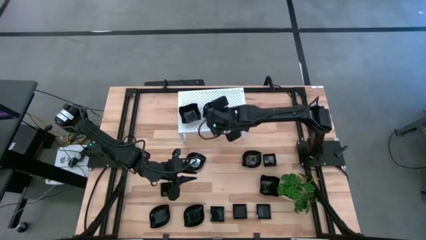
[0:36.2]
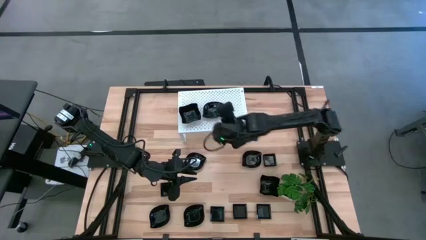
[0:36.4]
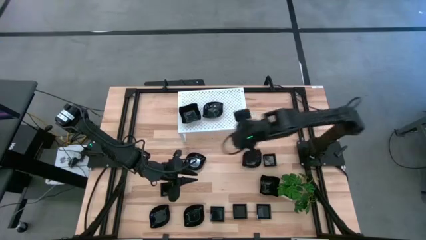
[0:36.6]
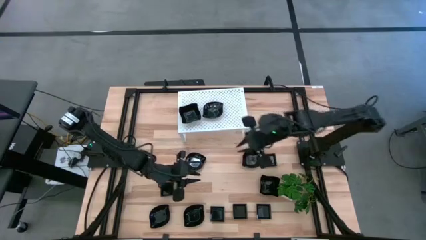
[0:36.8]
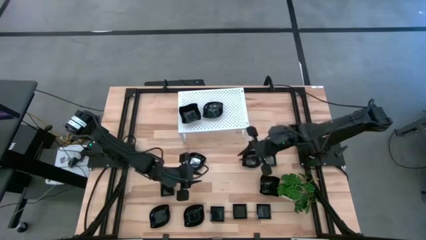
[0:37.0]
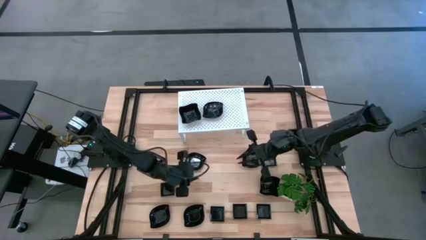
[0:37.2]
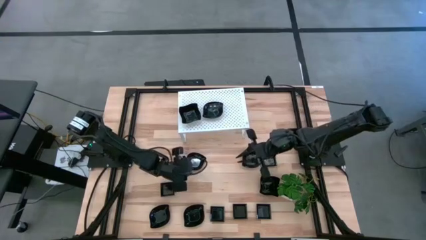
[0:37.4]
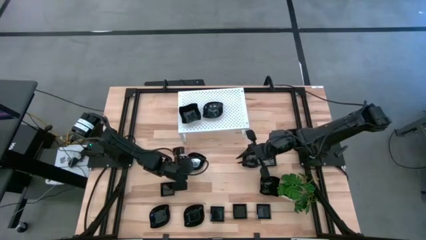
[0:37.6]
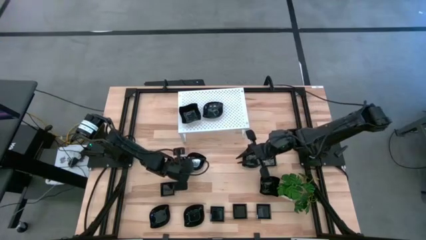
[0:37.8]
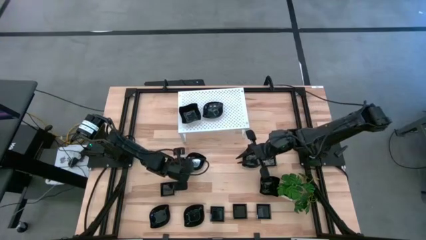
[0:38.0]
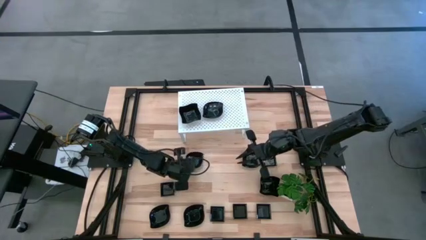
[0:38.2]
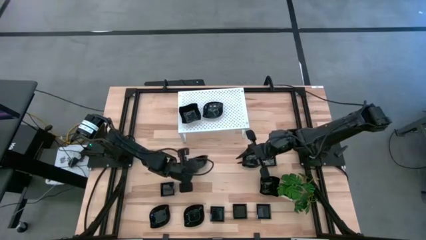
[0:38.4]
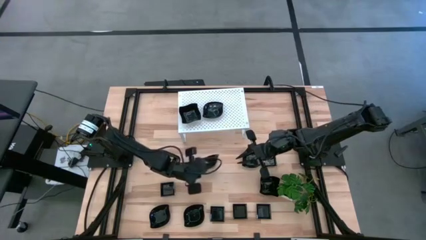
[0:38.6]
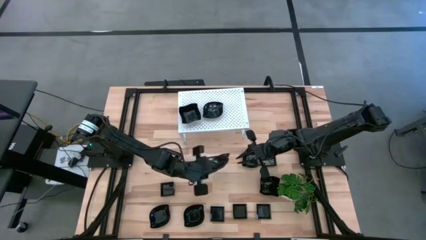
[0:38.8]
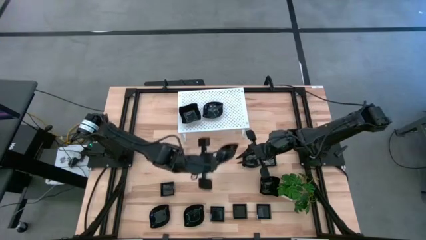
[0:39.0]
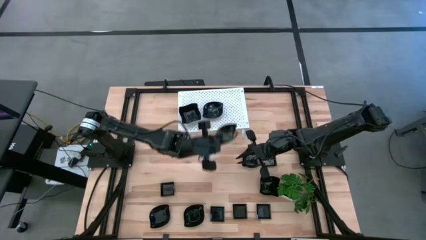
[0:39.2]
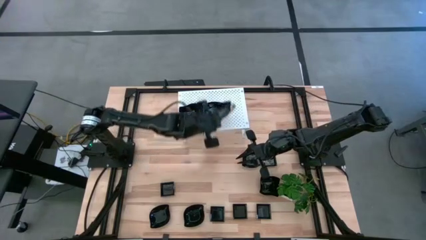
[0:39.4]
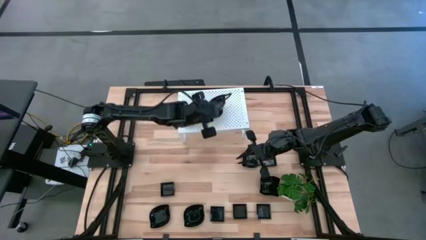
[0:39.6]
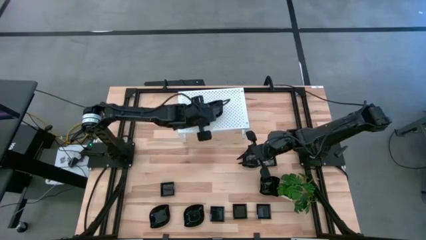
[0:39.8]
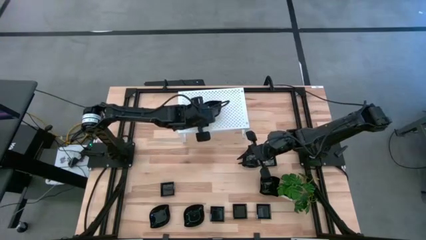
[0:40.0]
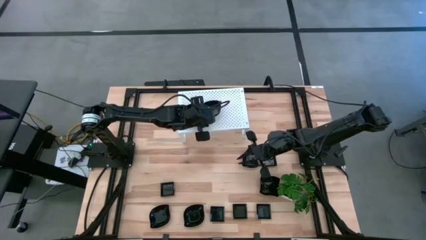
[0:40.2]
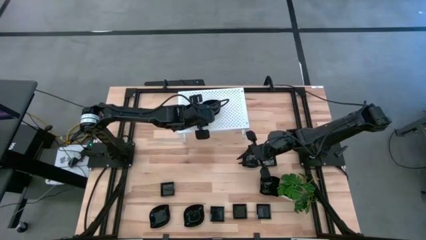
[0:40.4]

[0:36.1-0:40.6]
Task: Pick & Place Mini shaped plates
Stack the black leaf shaped plate on top of the black leaf shaped plate on the shelf

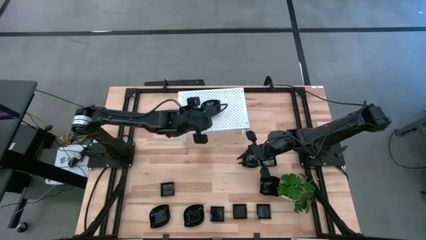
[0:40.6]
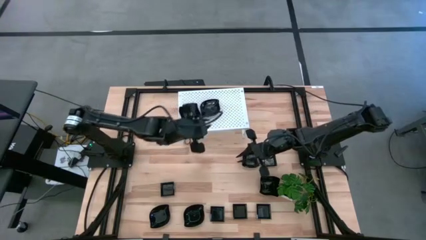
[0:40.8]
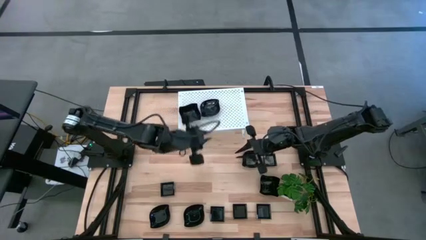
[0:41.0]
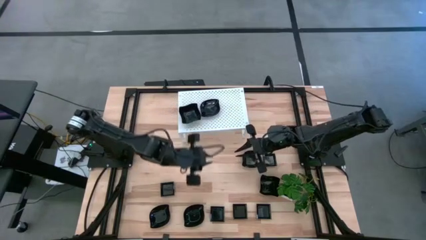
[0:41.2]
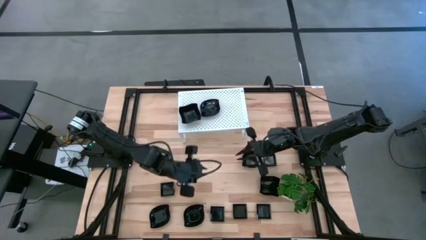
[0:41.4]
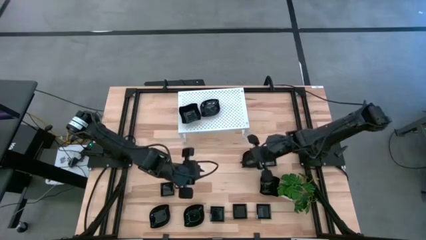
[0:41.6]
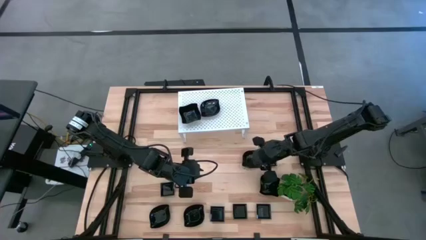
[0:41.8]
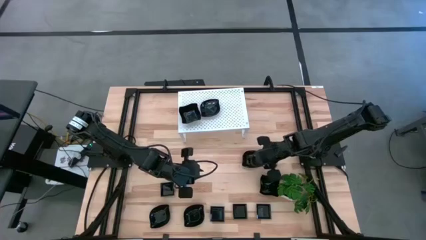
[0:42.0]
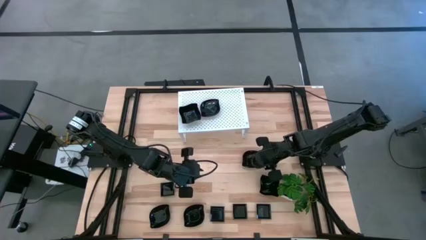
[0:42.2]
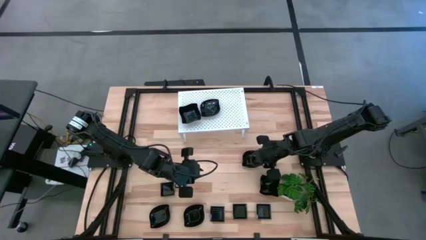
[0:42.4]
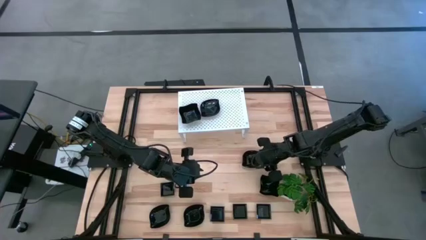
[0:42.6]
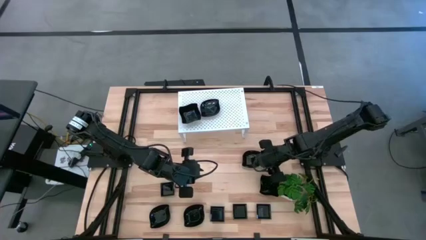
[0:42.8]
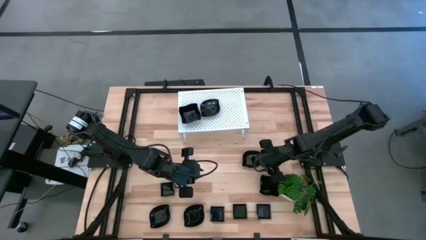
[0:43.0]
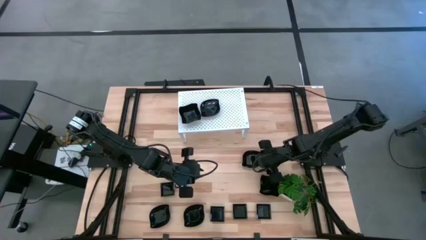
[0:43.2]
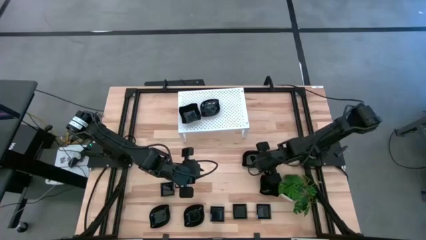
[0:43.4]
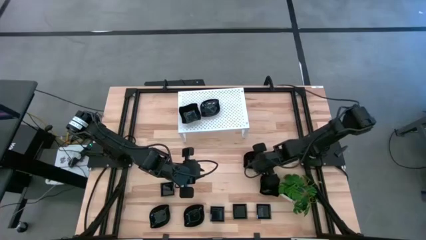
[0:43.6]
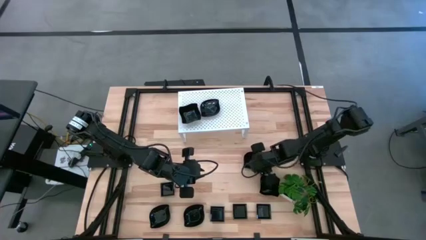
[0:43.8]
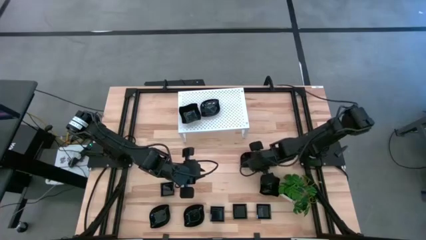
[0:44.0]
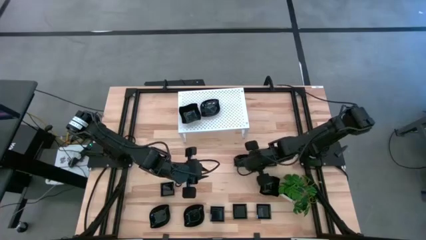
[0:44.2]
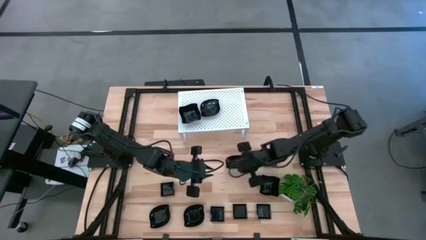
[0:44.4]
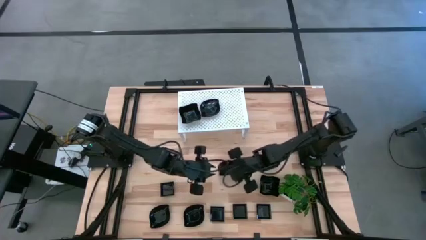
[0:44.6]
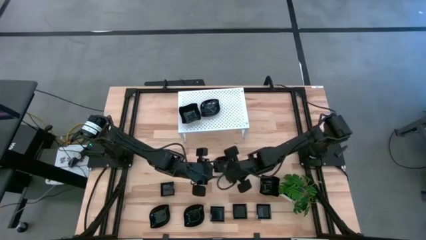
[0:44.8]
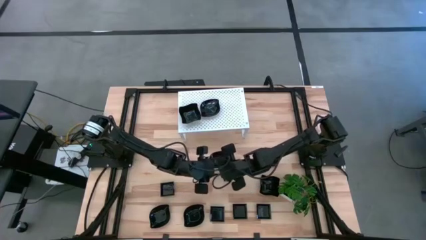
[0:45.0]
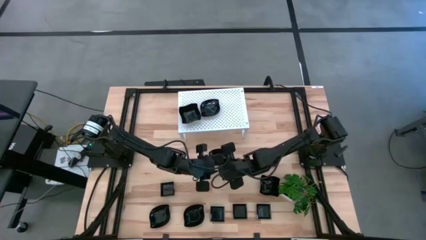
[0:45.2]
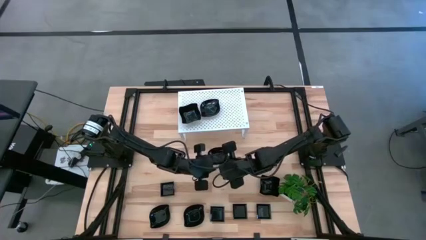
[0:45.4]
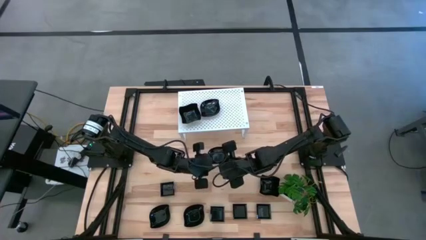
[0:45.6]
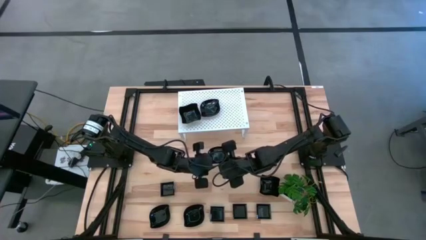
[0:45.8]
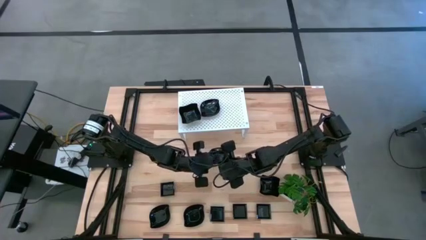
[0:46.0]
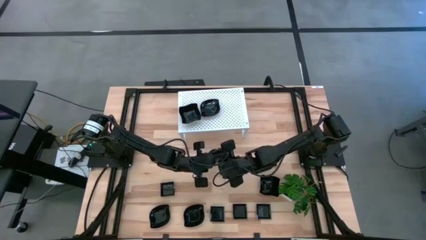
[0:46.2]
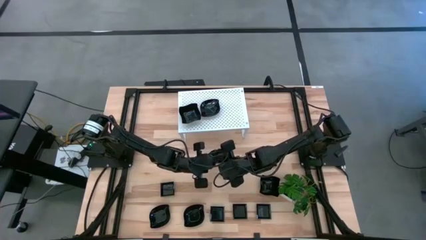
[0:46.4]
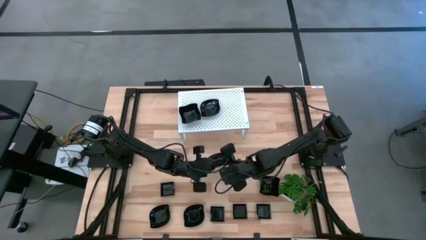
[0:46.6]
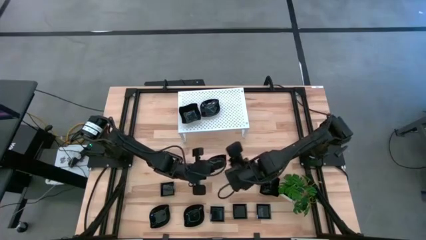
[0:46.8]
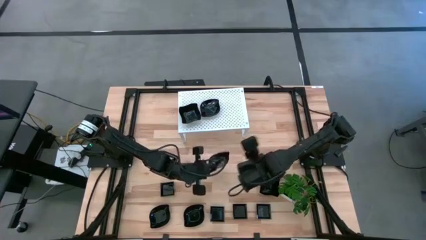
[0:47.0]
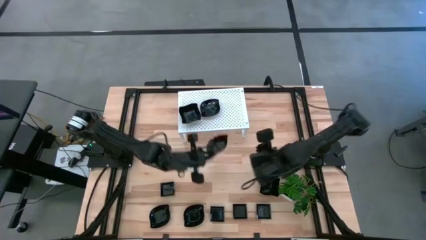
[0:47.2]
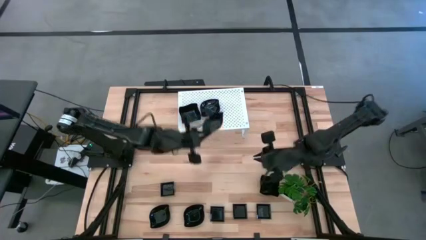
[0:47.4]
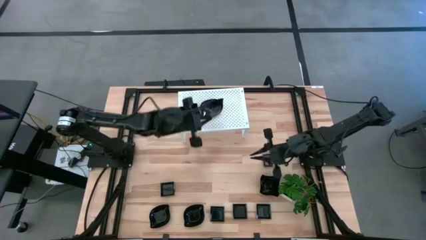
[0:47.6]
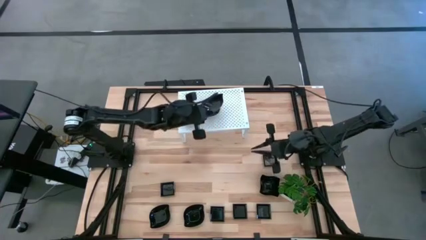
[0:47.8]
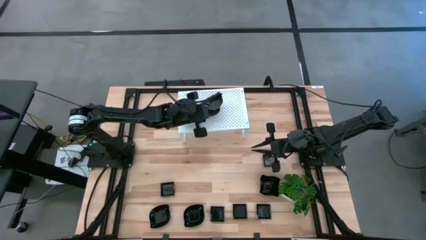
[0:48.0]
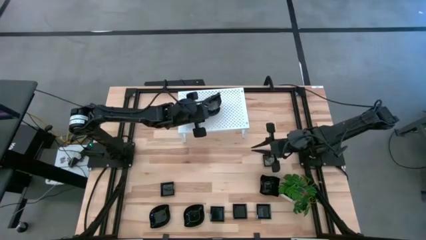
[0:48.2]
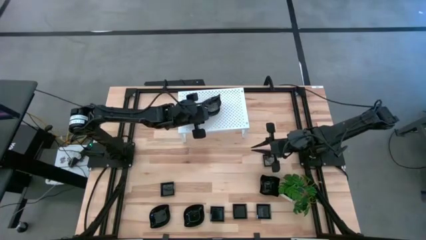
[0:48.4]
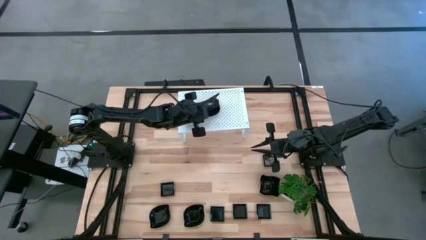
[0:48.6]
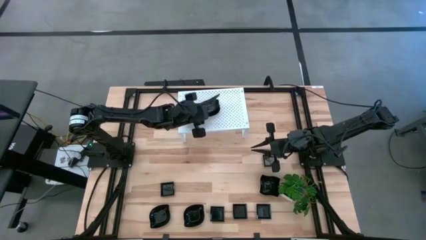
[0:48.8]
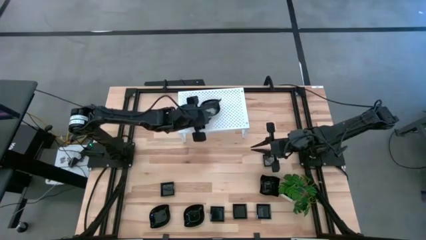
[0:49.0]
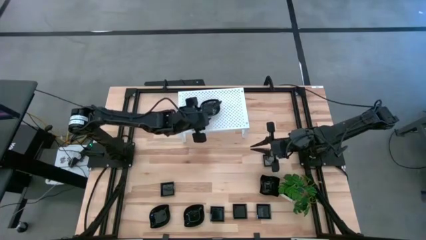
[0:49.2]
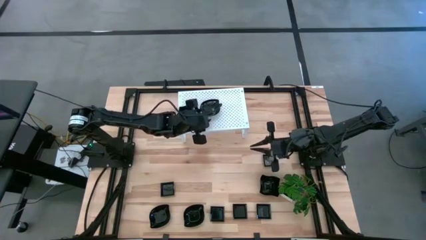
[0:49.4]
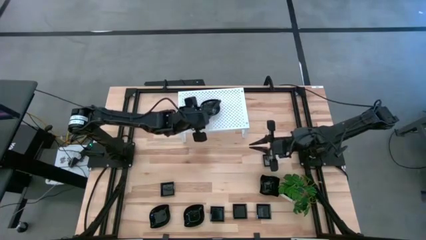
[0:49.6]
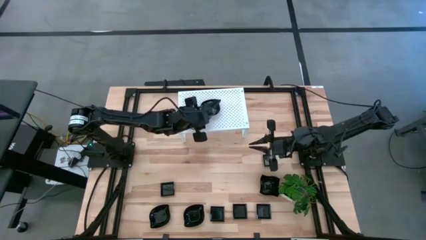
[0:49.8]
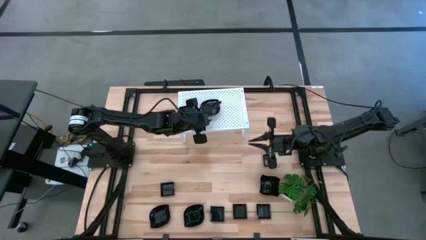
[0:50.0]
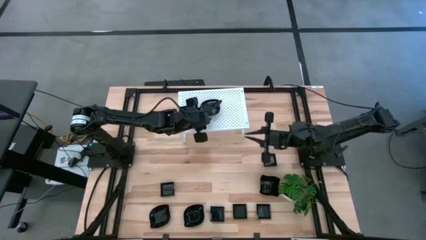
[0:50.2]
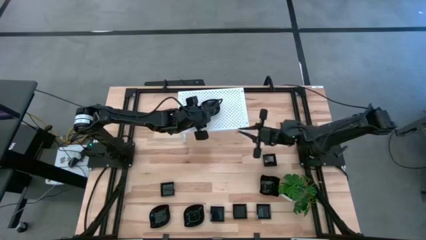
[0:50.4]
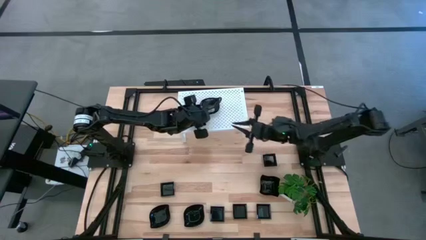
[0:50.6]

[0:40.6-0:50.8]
Stack the black leaf shaped plate on top of the black leaf shaped plate on the shelf

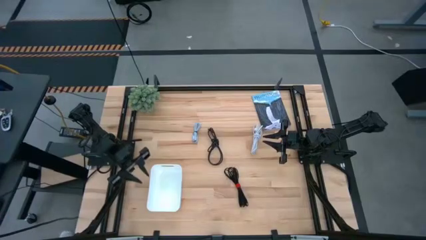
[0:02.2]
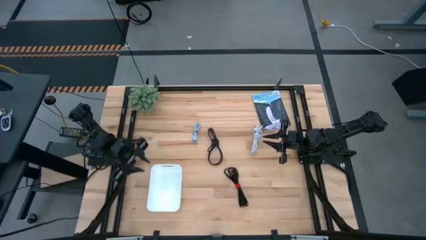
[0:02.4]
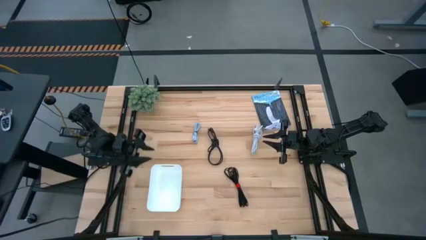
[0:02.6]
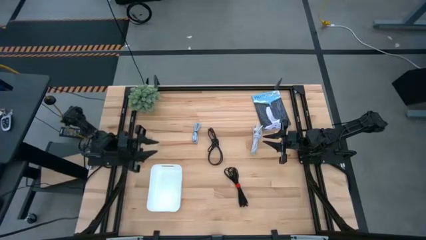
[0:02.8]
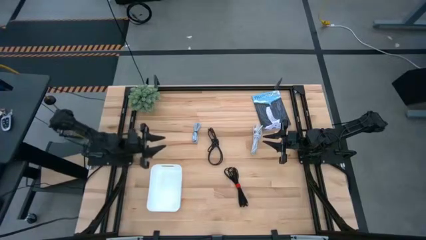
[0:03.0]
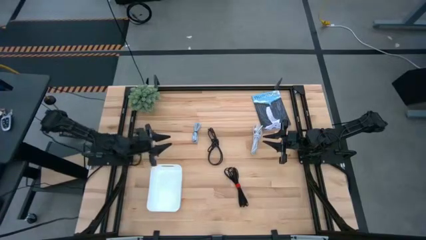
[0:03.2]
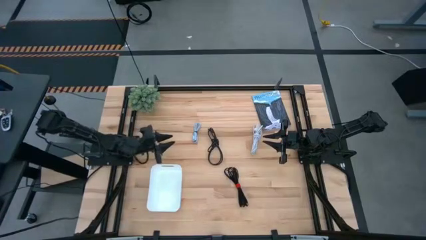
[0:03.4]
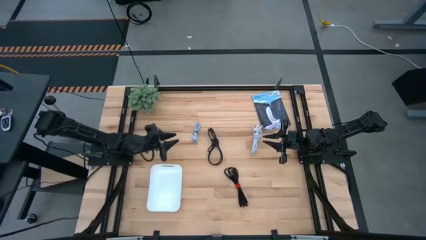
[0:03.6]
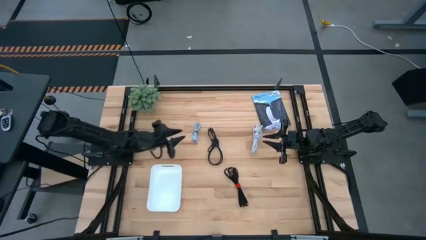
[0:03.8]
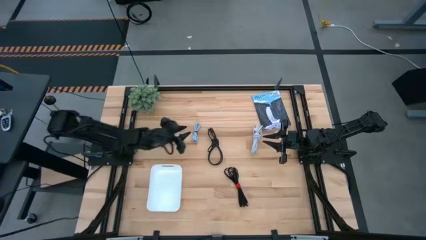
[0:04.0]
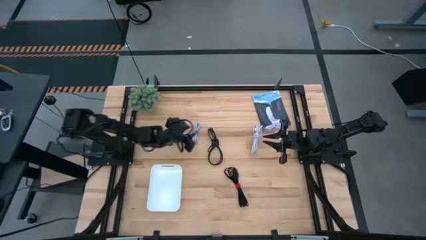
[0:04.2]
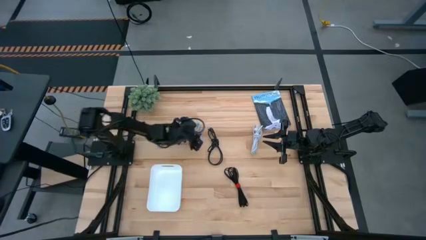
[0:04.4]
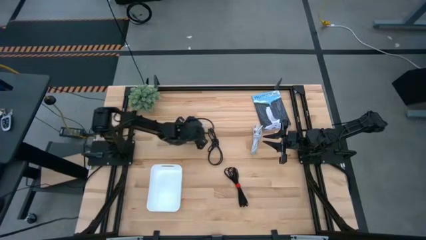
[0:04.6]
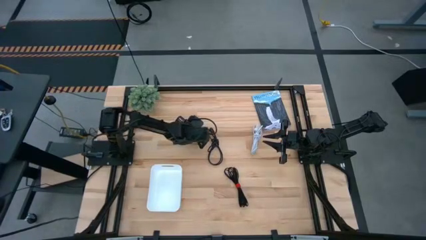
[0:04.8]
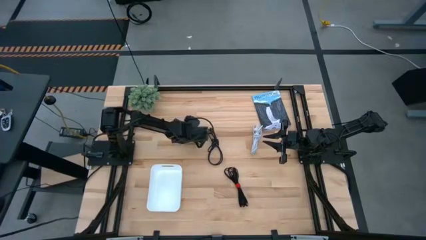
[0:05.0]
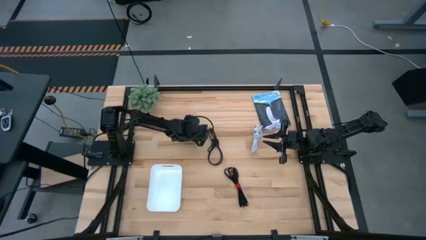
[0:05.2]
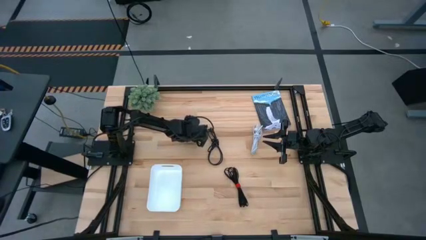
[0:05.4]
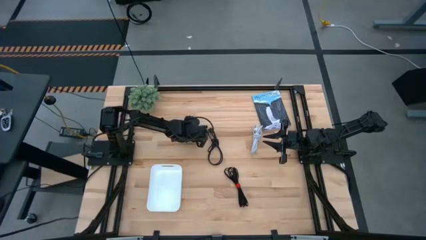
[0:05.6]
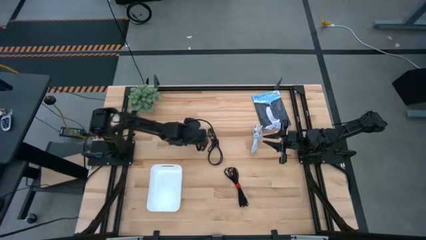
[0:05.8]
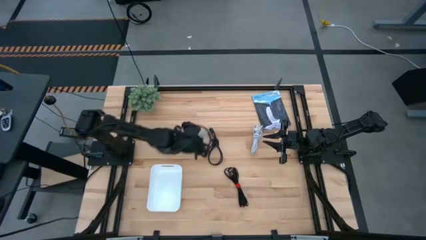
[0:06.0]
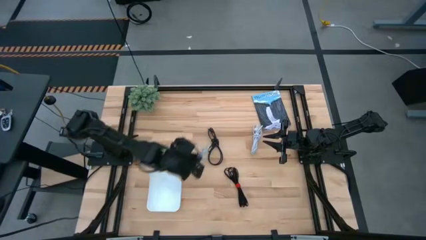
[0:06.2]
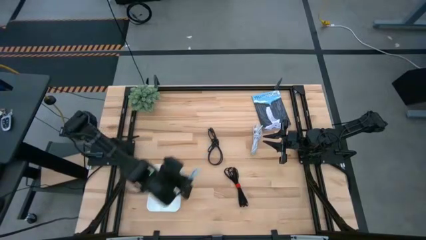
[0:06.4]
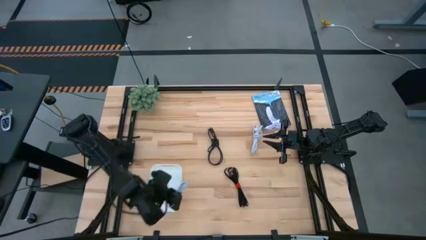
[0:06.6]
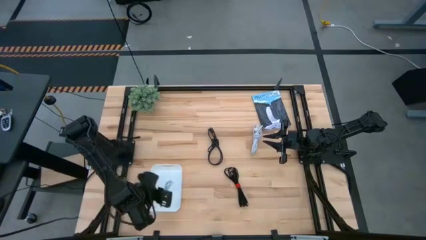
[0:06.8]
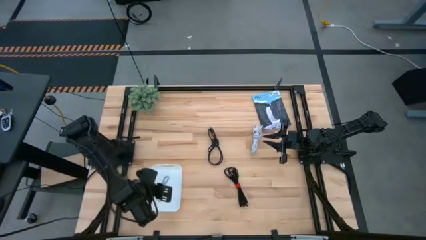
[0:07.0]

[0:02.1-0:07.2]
Task: Pick and place USB-C Cables
Put the light blue USB cable into the white bin
